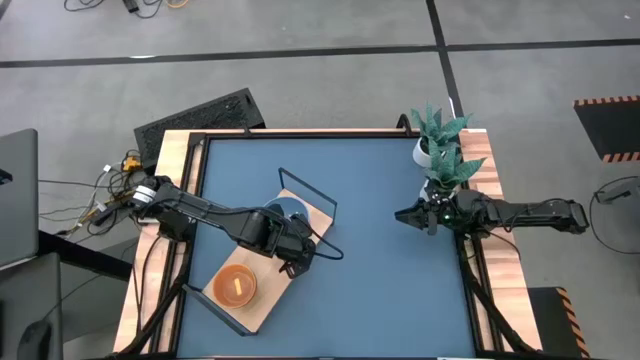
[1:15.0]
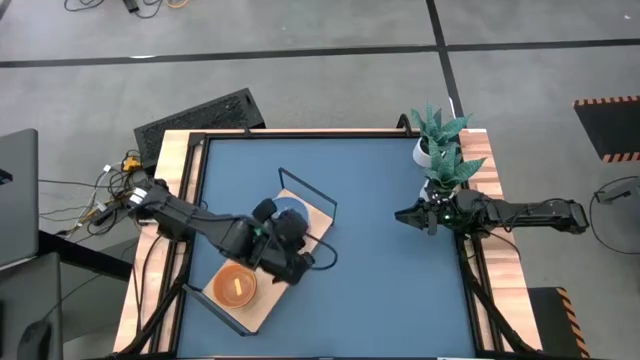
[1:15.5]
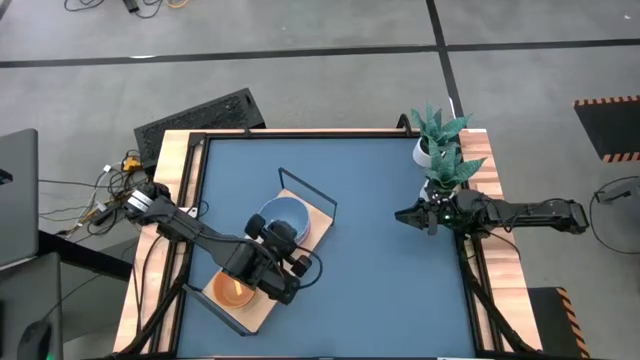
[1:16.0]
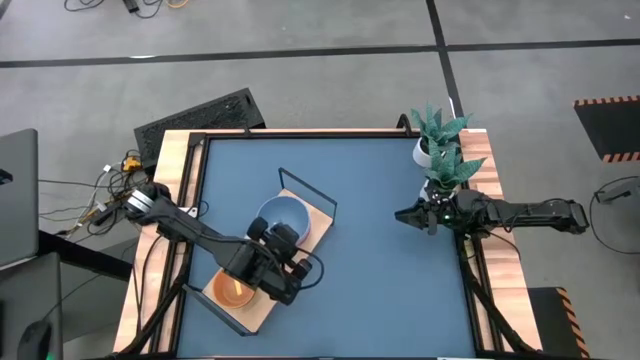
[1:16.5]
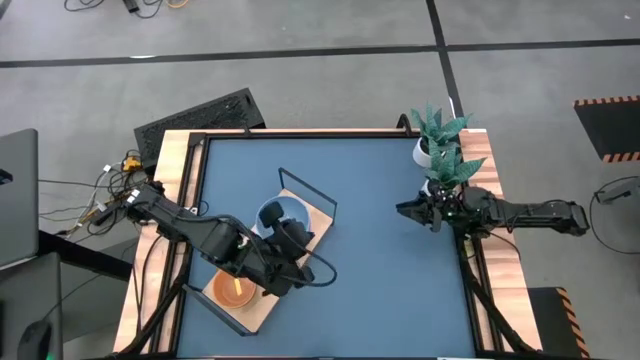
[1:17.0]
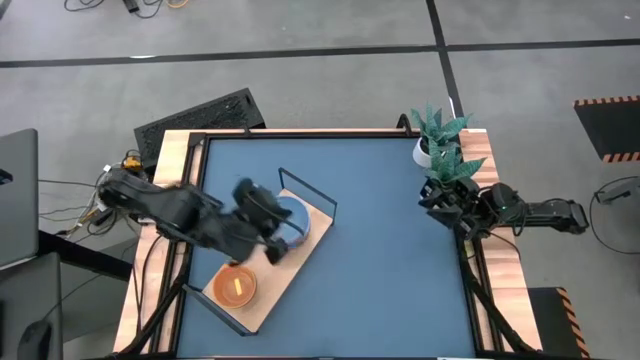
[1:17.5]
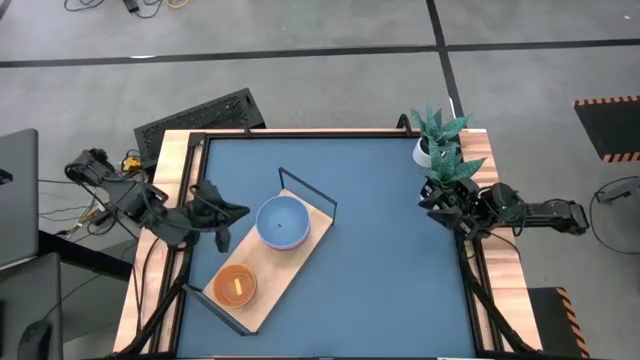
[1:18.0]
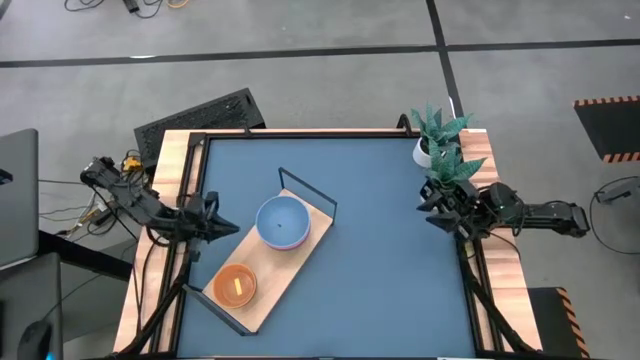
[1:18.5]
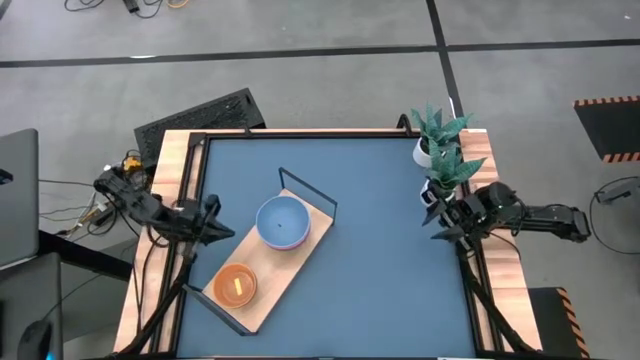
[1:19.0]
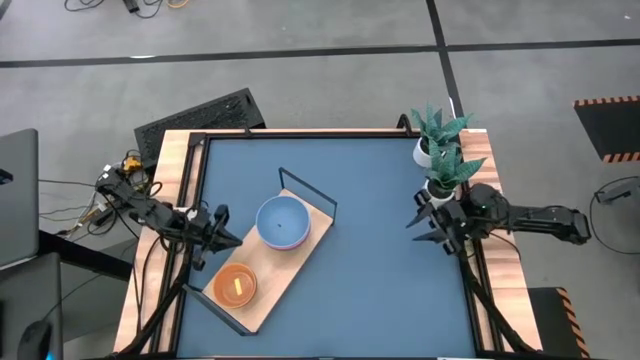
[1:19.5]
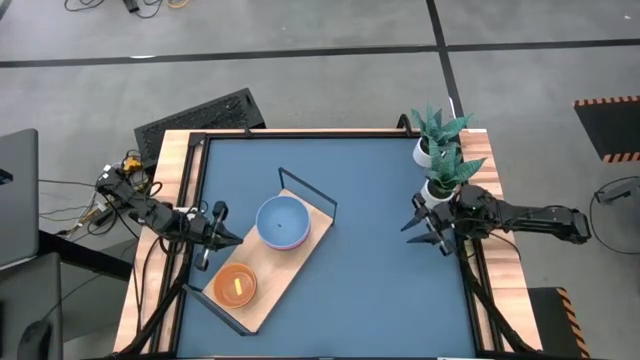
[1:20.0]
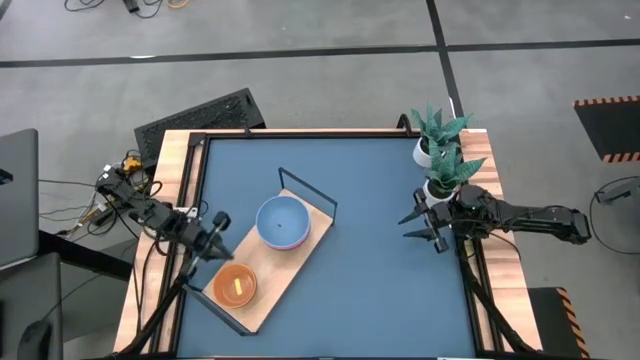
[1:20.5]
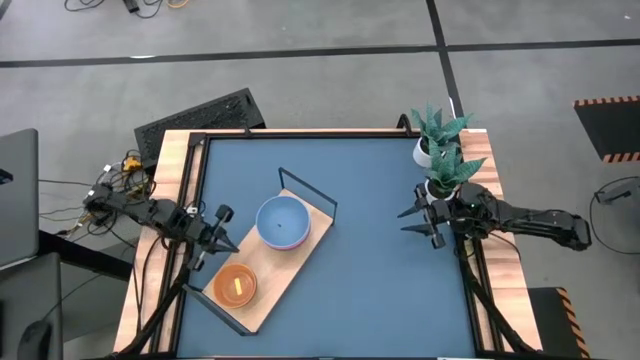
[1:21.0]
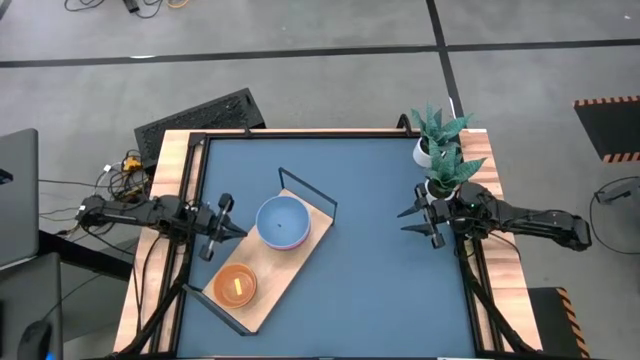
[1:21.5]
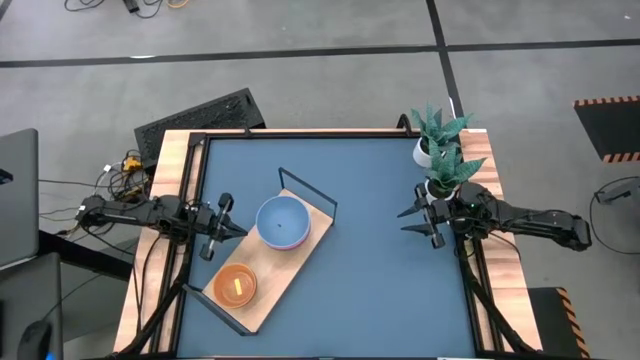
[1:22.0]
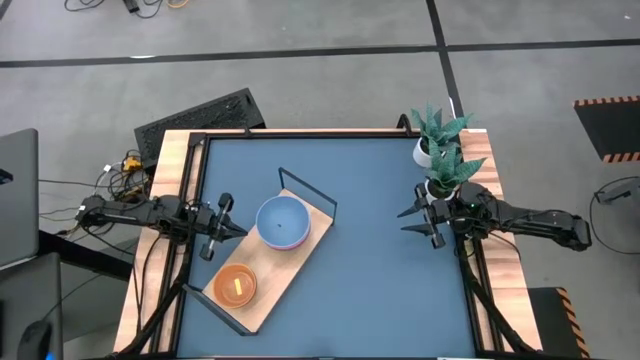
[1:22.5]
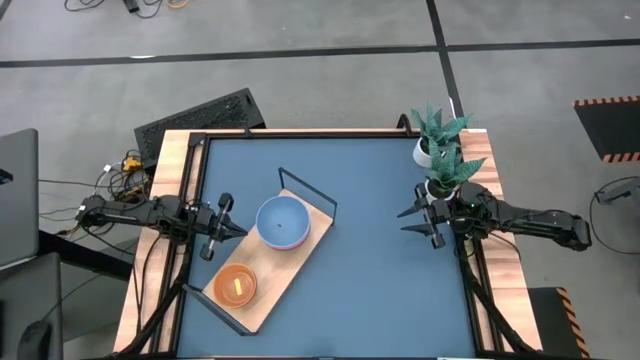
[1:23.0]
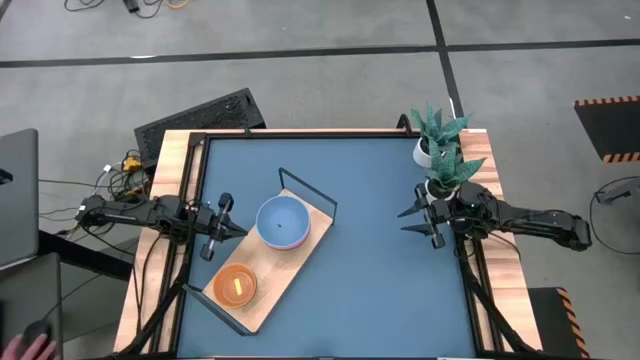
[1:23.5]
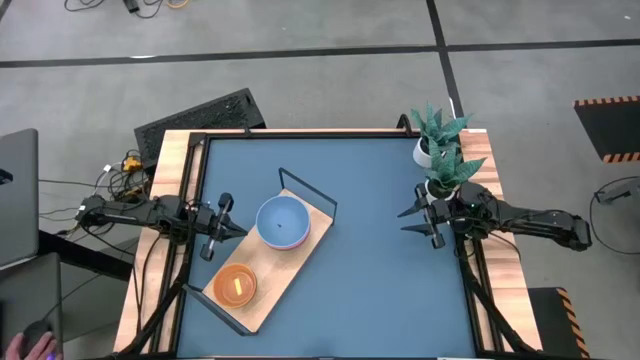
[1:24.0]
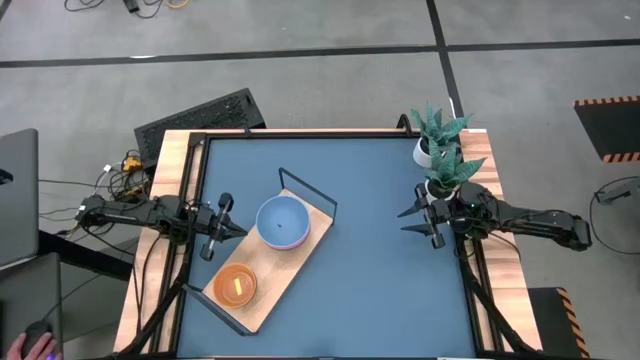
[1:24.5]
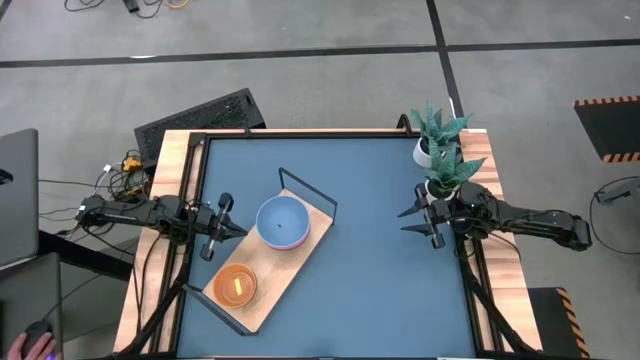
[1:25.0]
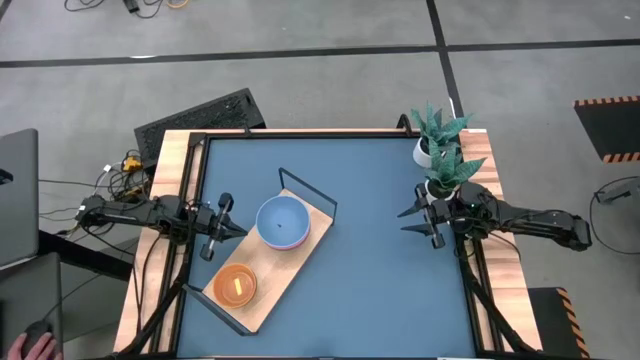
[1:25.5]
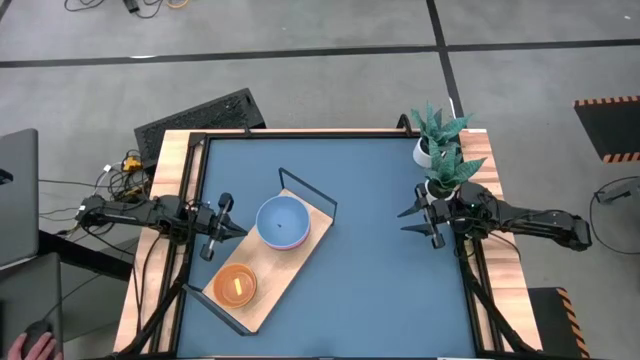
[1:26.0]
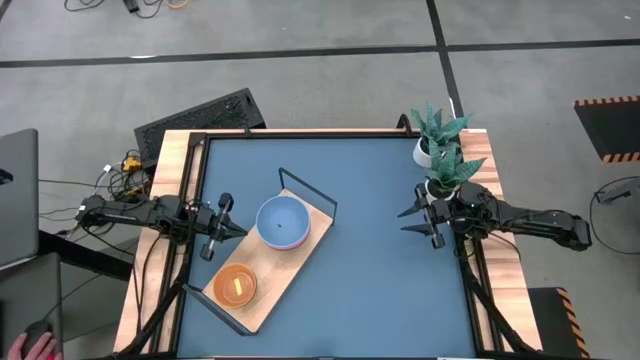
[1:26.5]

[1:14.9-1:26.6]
Task: Place and stack bowls onto a shelf
Return to Home Position

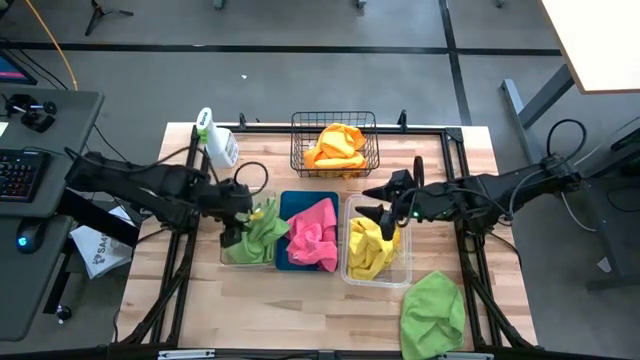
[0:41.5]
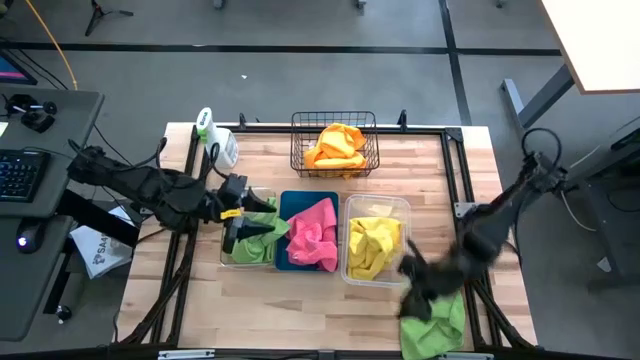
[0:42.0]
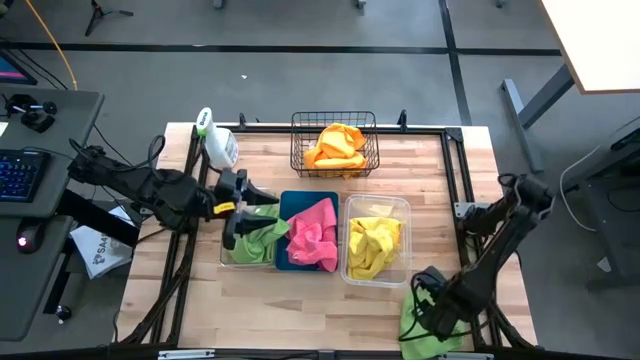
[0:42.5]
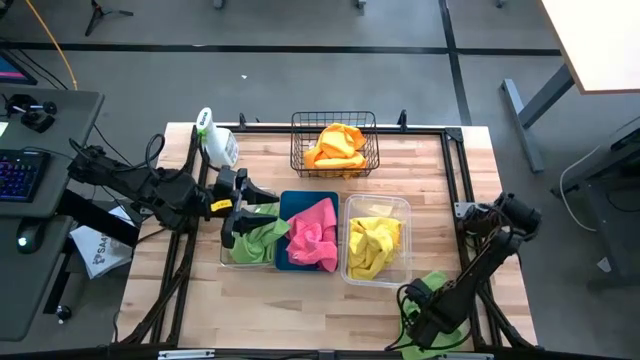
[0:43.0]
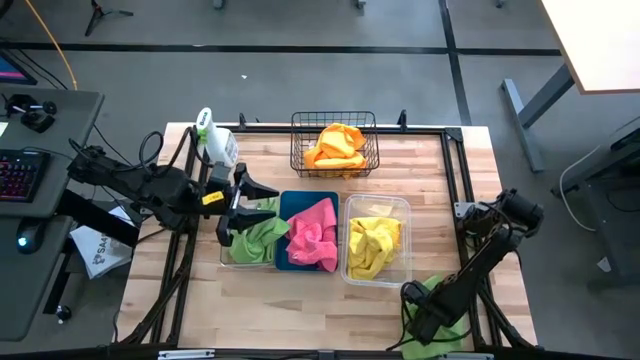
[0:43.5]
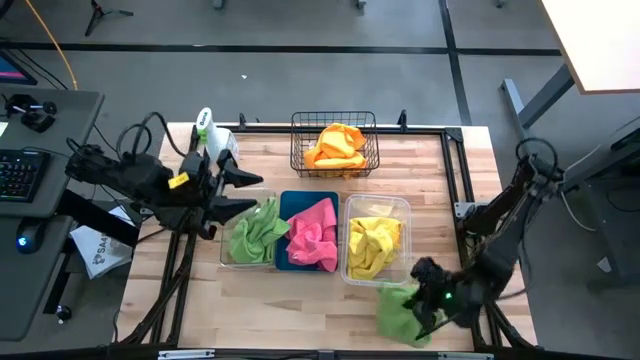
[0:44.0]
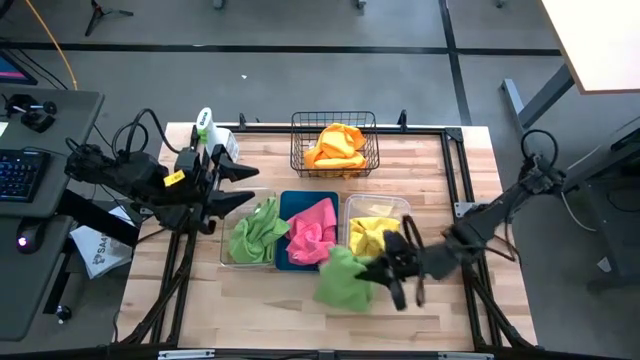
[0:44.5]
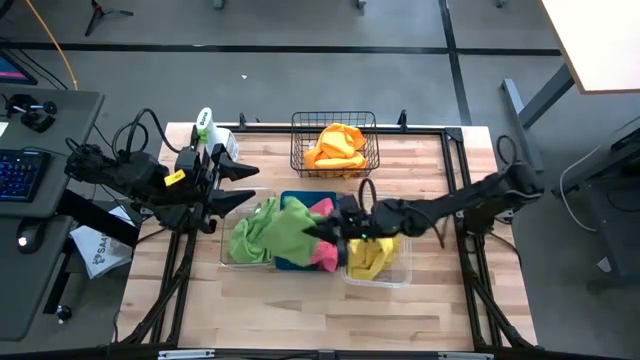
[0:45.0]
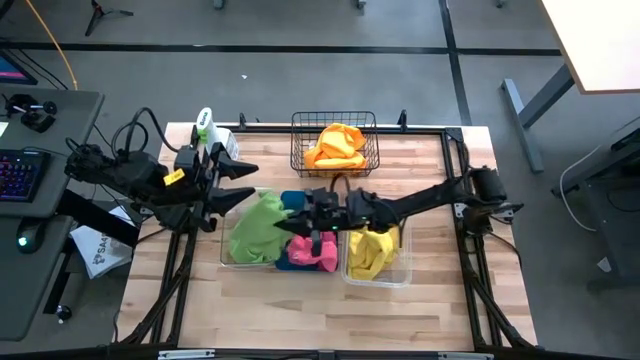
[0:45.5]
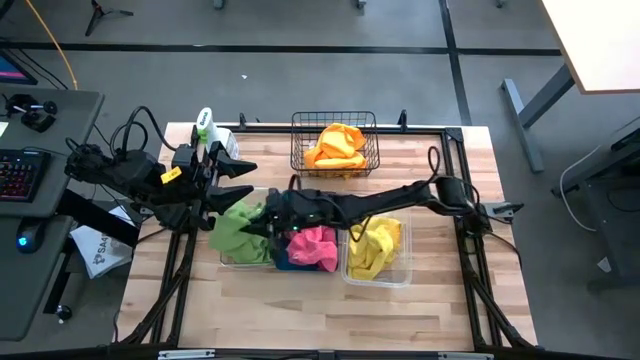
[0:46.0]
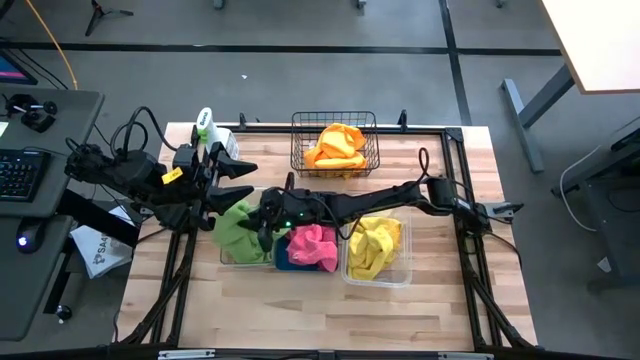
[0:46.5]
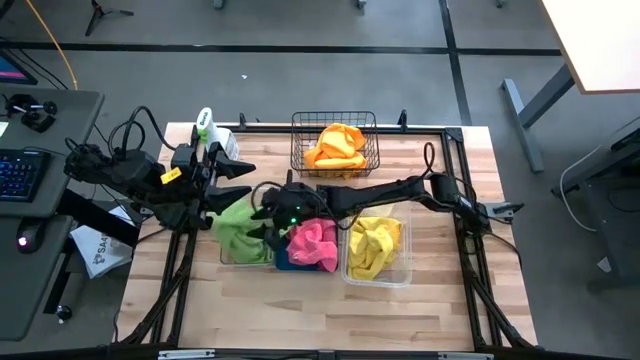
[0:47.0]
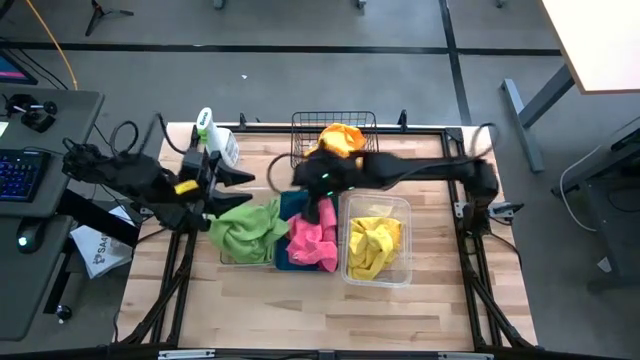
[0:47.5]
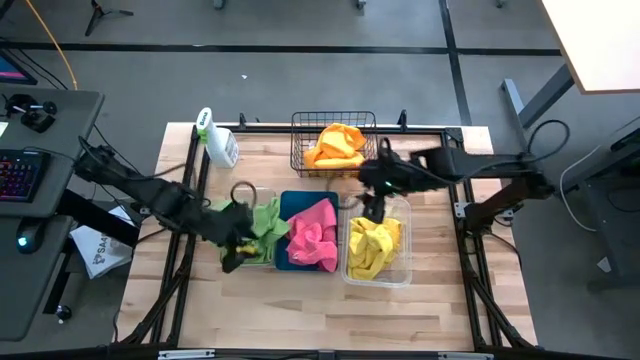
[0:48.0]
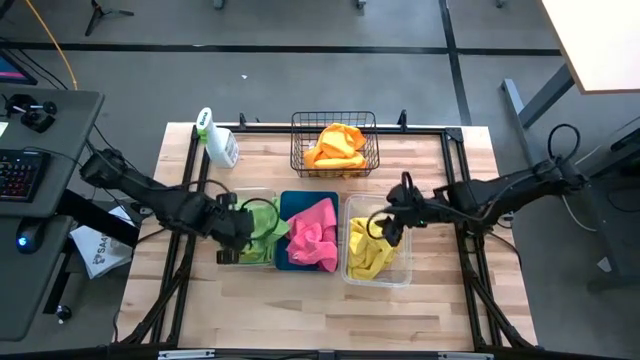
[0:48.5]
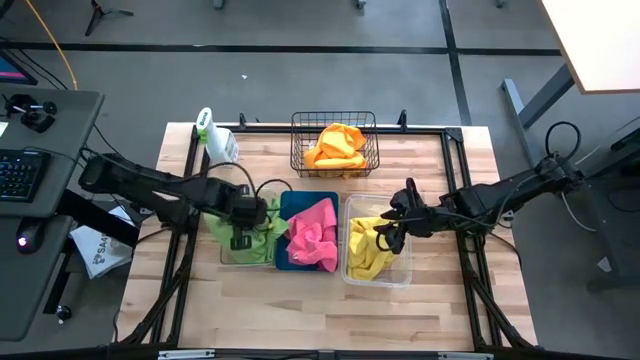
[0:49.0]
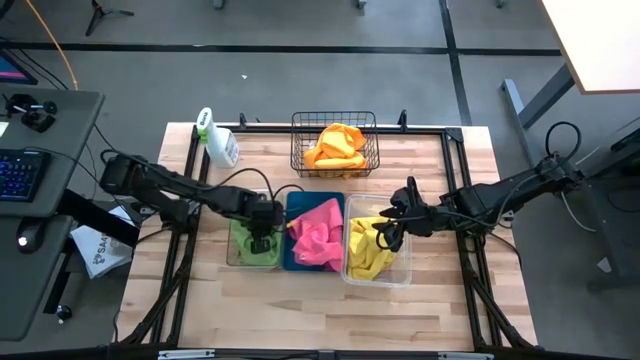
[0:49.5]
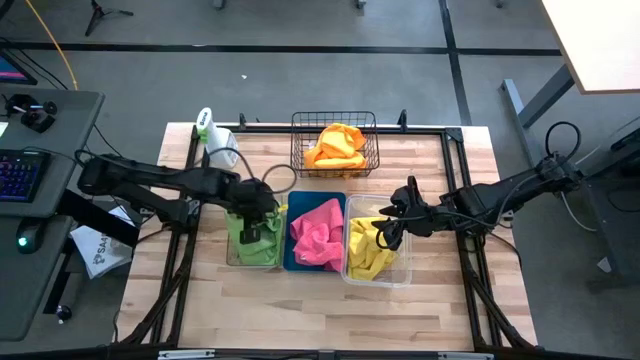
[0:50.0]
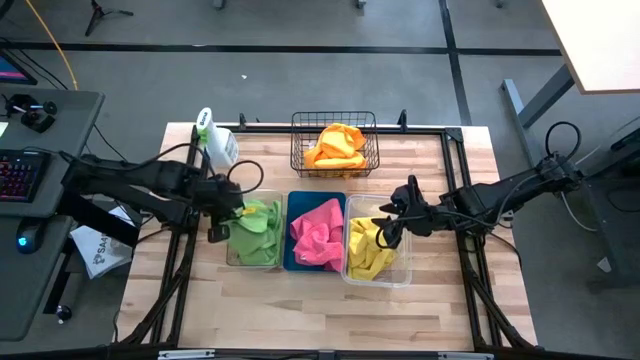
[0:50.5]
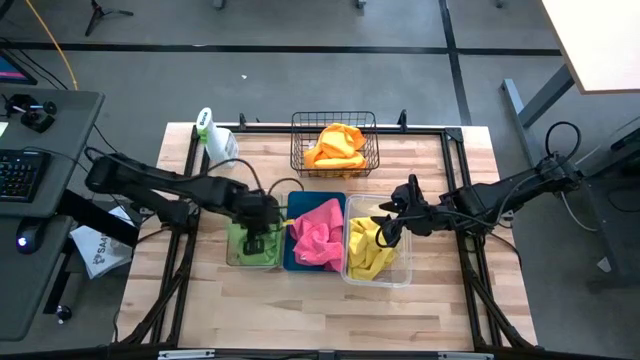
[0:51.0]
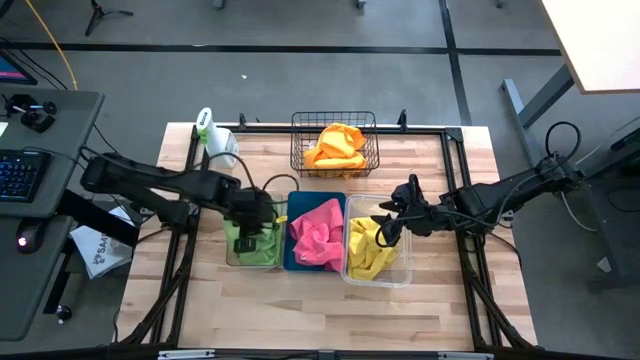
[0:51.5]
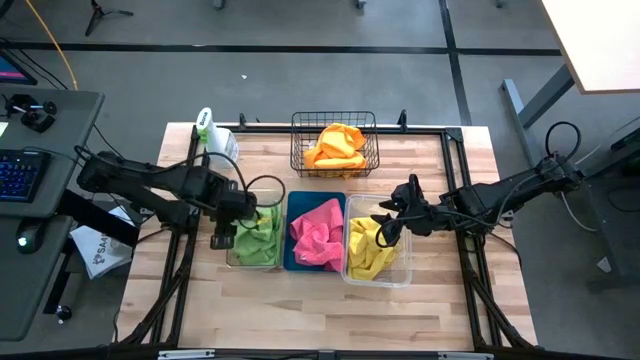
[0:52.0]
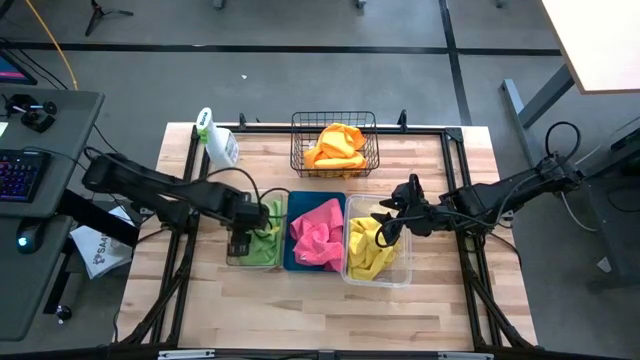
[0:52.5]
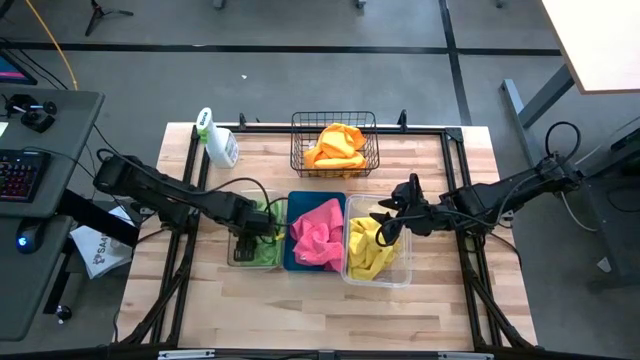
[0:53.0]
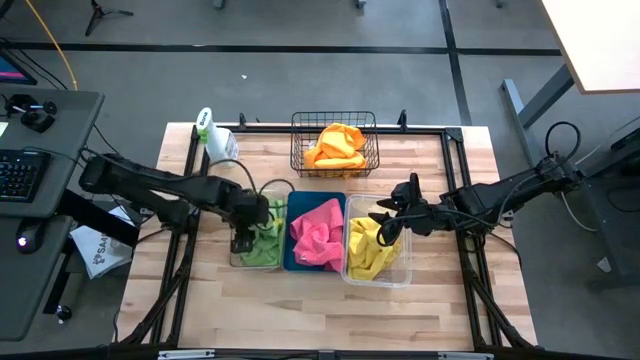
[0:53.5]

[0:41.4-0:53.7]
Task: Sort microfiber towel by color & place in baskets
Put the green microfiber cloth into the left transparent bin
